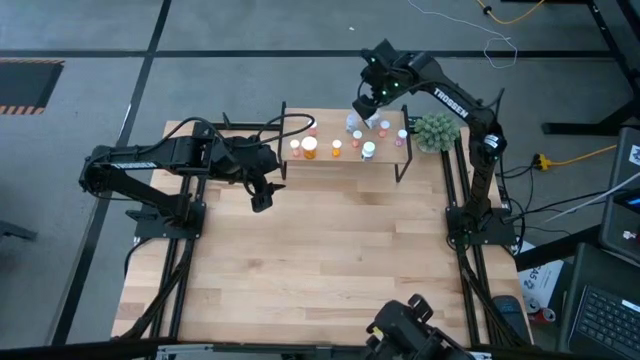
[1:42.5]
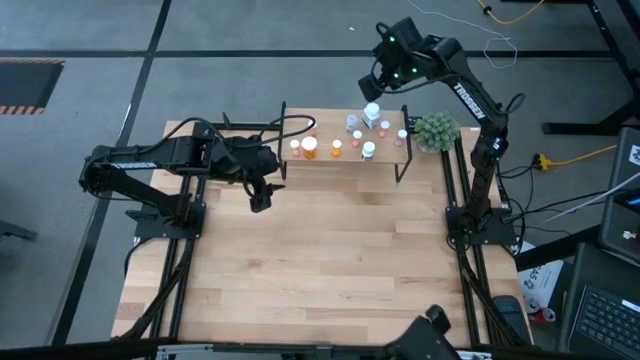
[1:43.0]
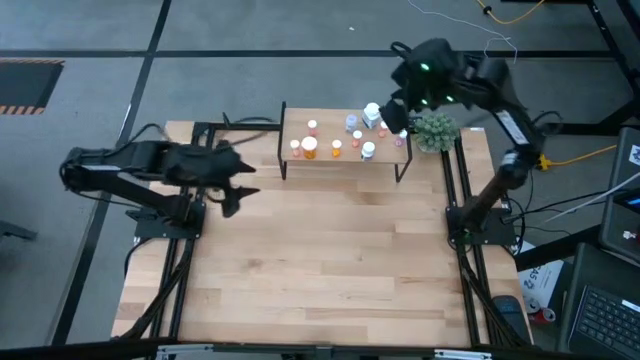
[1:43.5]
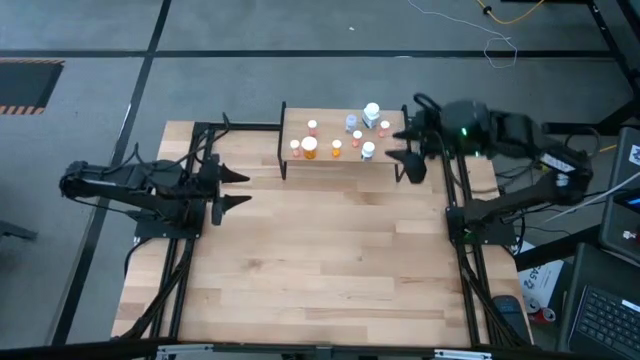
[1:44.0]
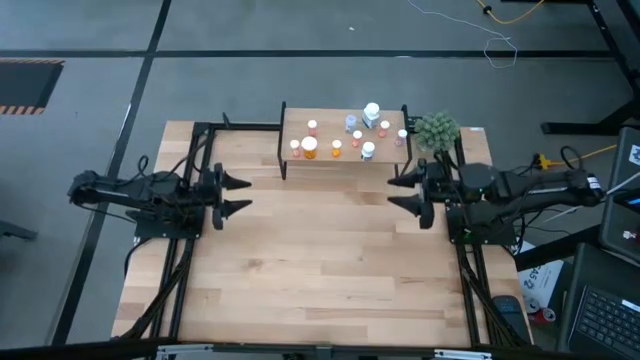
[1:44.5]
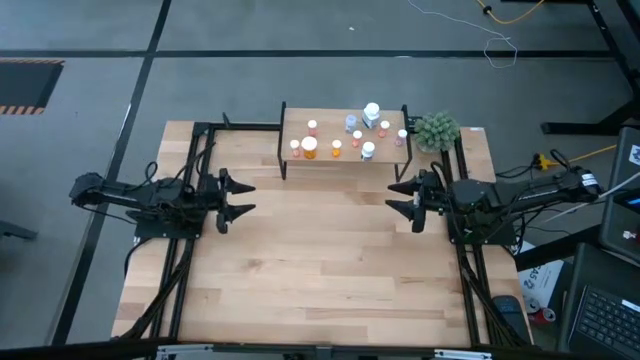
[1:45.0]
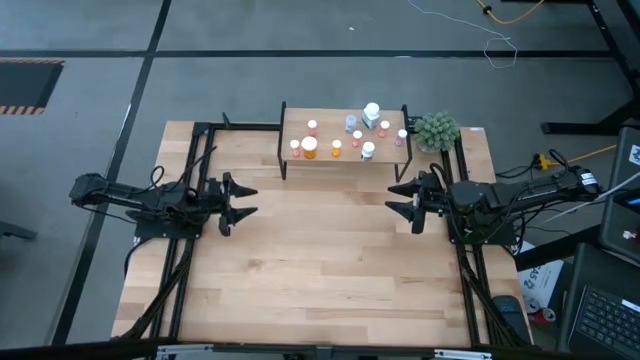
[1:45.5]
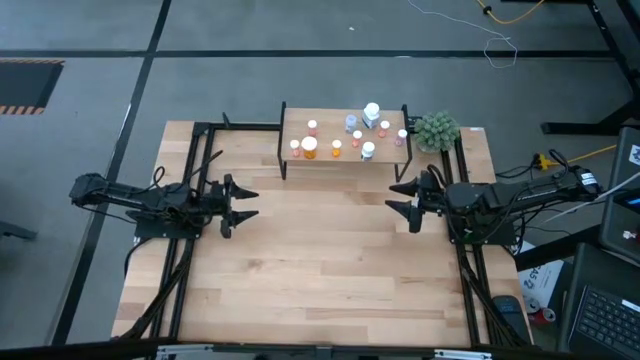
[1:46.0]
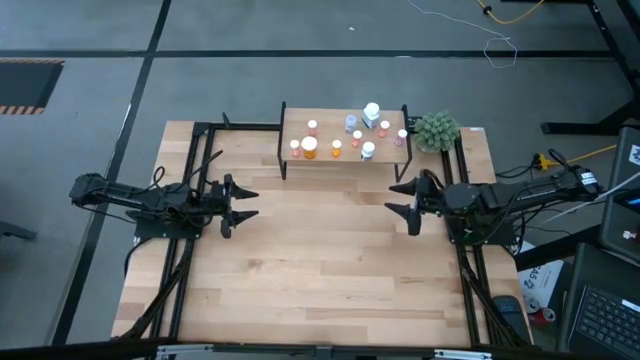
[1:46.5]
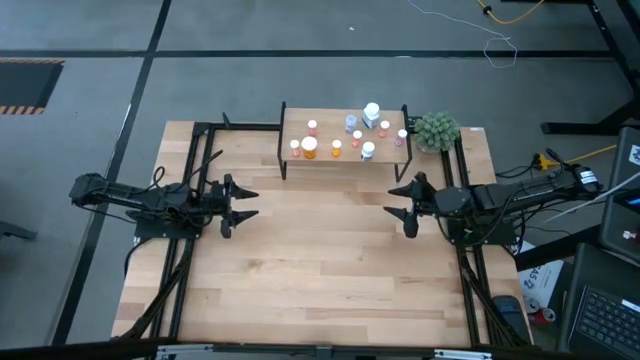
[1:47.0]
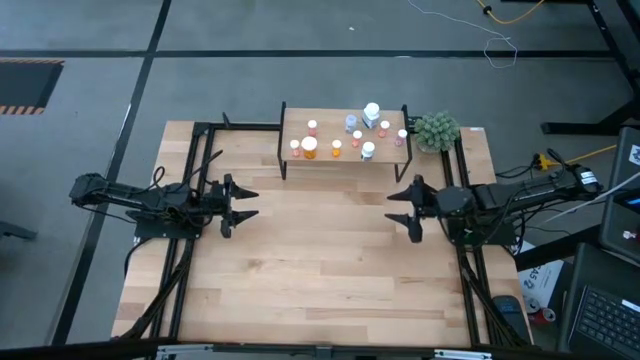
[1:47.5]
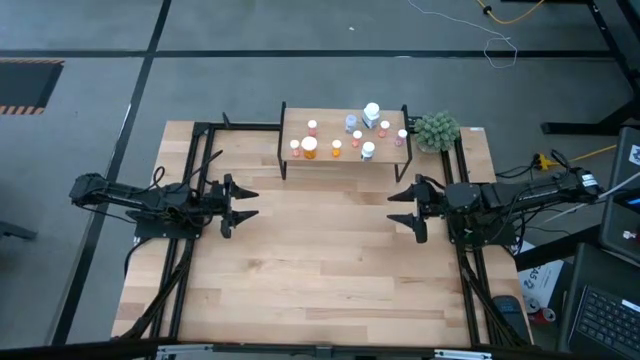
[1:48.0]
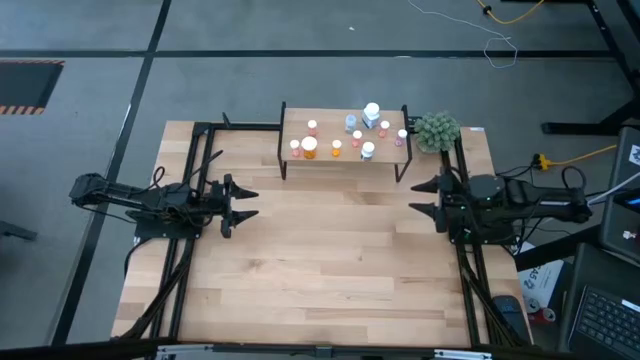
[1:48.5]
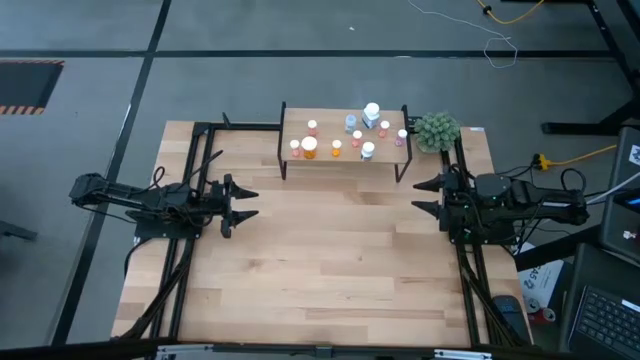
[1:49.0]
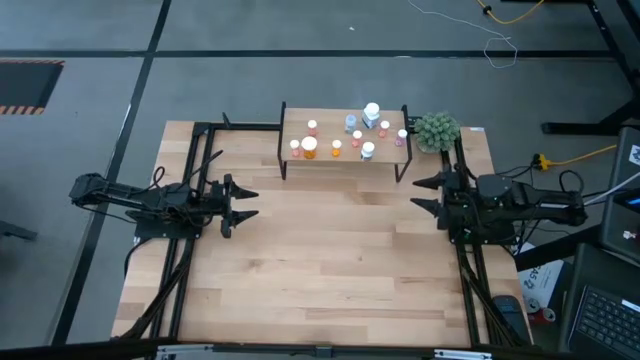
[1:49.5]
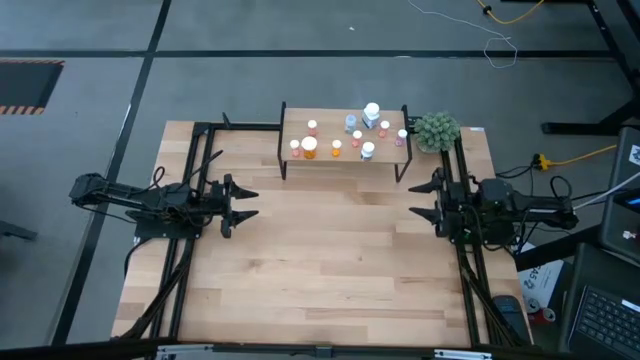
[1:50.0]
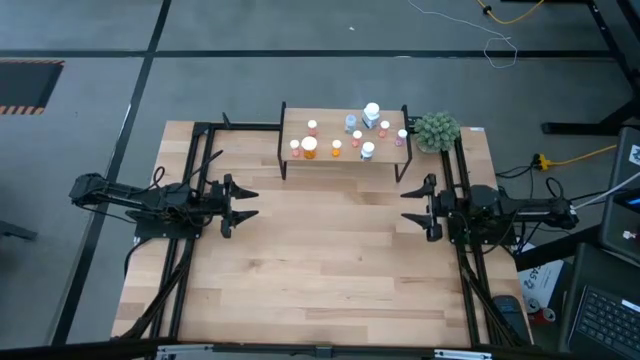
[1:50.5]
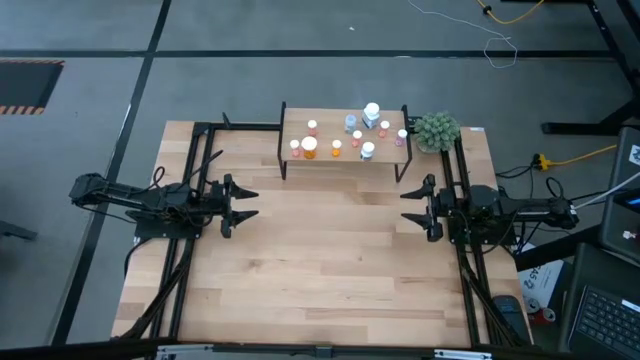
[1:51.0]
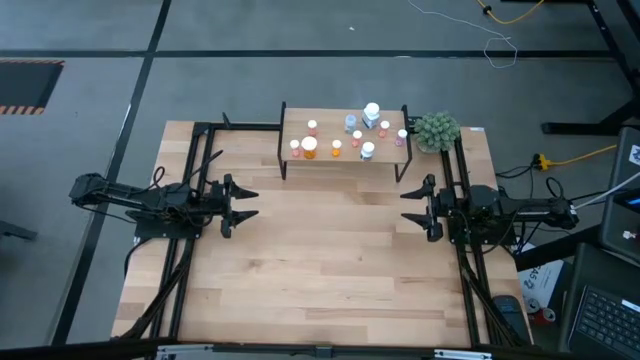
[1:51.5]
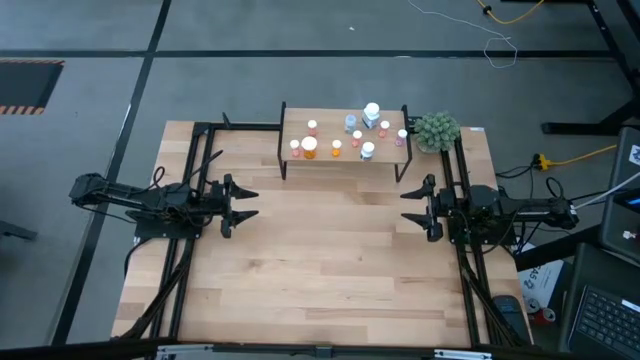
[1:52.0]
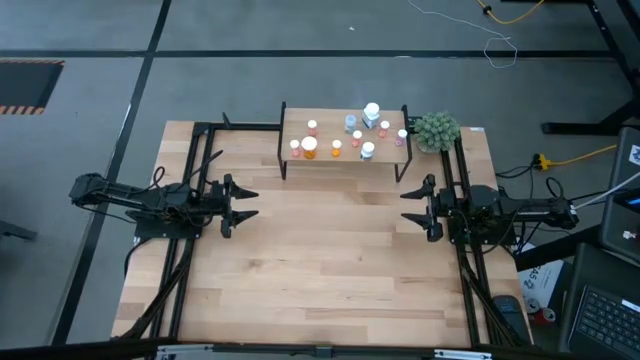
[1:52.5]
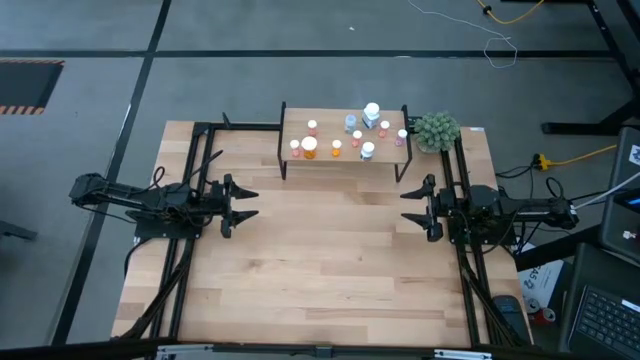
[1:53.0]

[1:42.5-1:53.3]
Task: Pick and place medicine bottles onto shelf by color
Return to Home Position

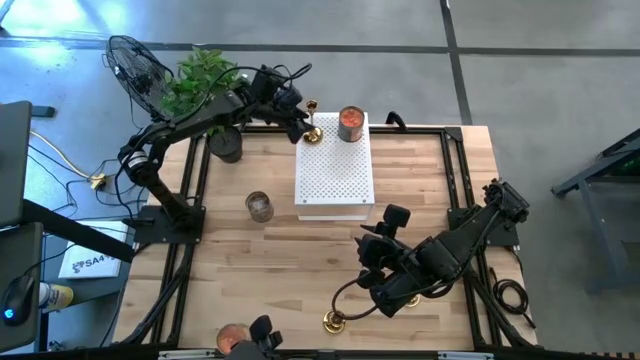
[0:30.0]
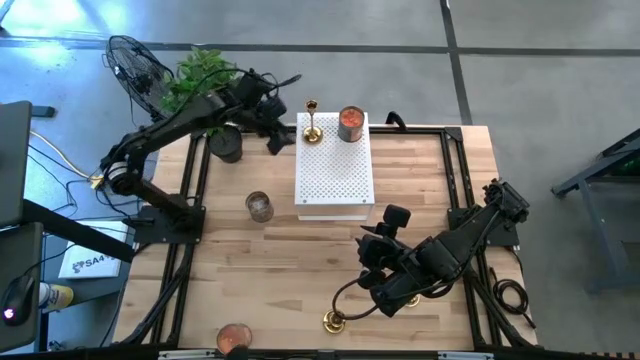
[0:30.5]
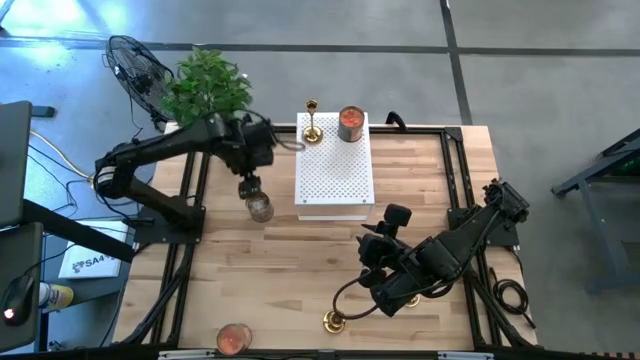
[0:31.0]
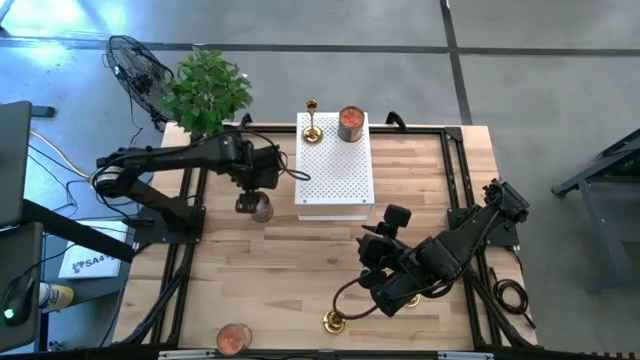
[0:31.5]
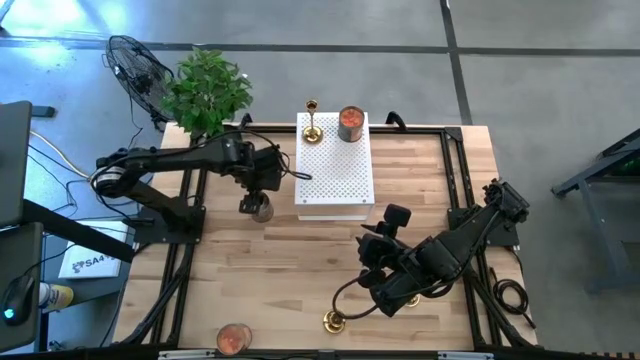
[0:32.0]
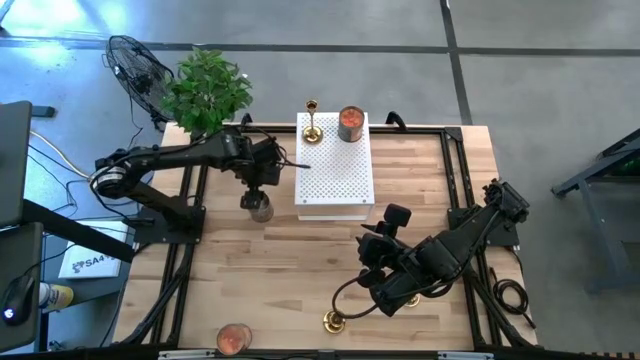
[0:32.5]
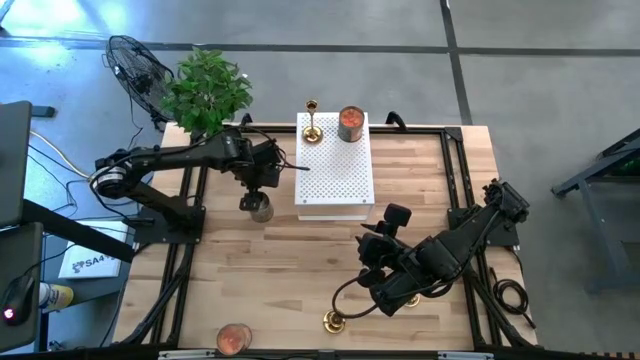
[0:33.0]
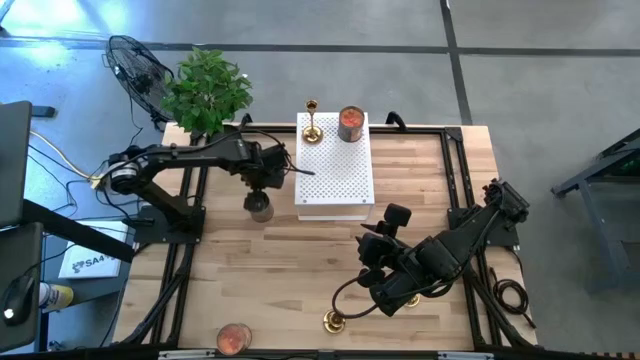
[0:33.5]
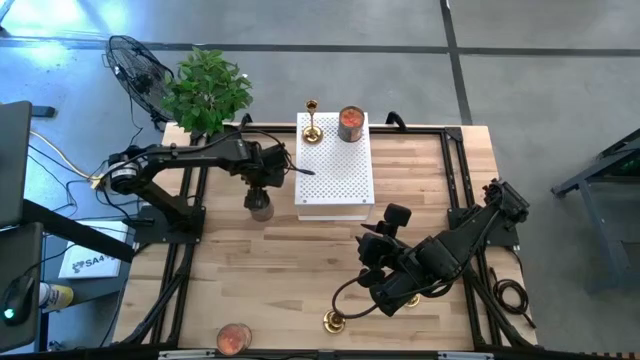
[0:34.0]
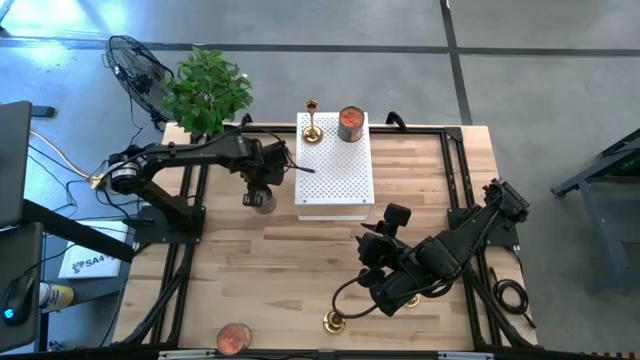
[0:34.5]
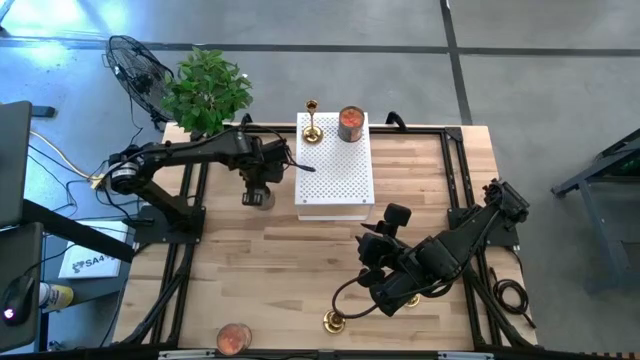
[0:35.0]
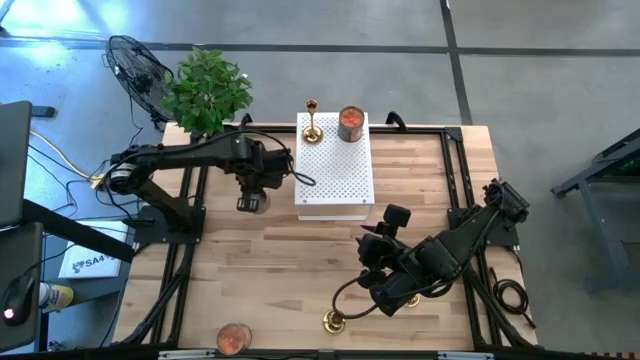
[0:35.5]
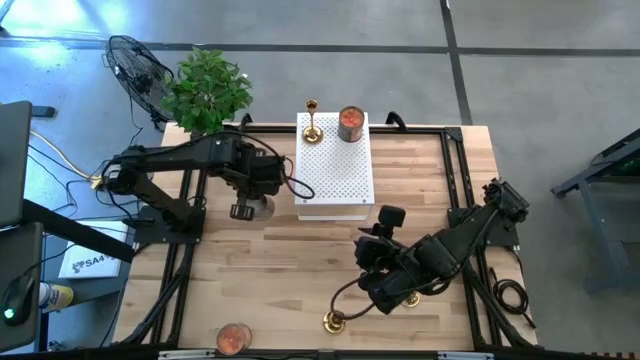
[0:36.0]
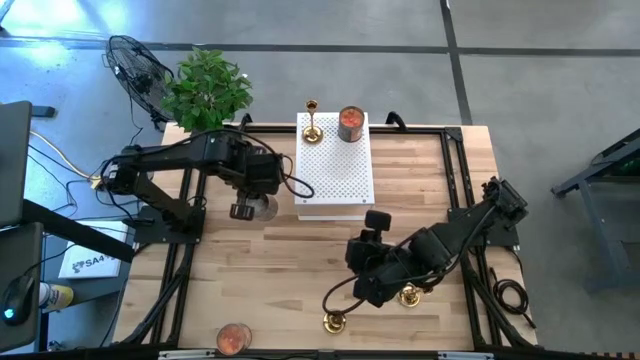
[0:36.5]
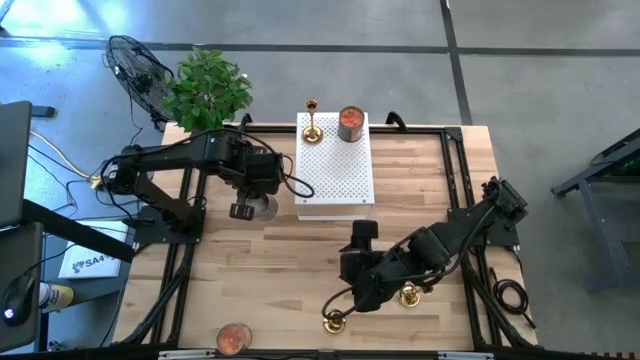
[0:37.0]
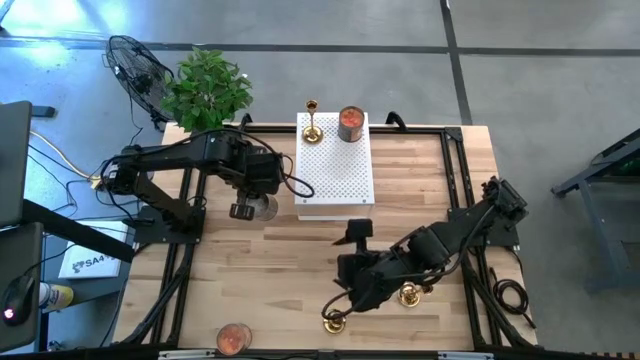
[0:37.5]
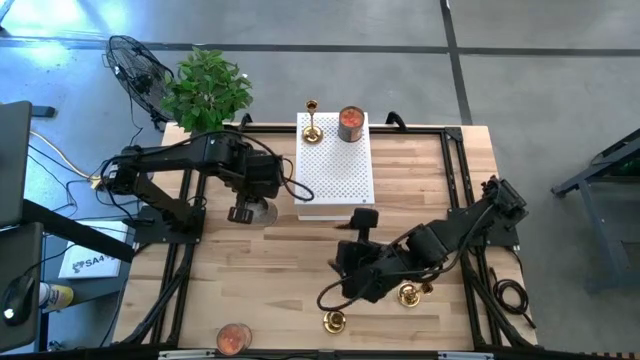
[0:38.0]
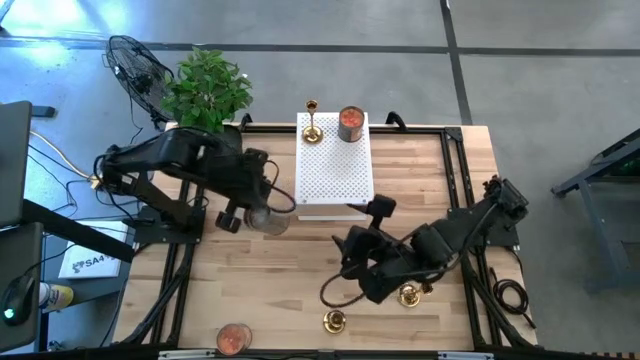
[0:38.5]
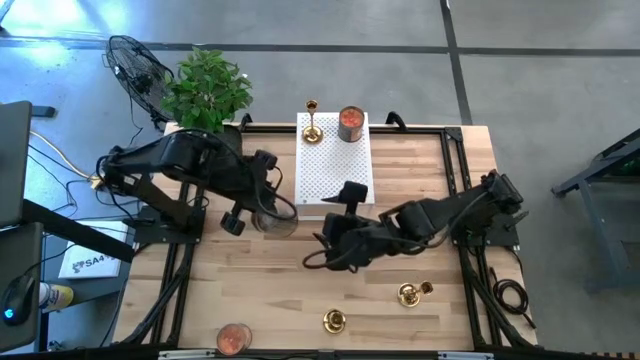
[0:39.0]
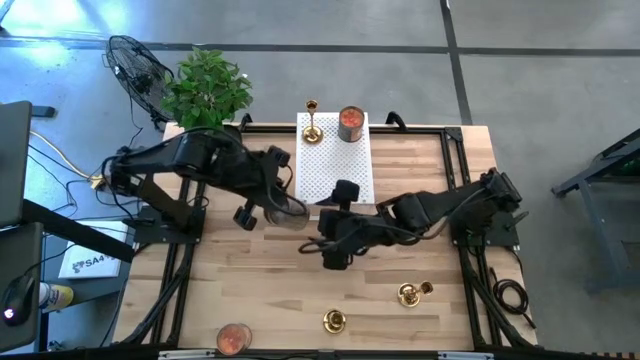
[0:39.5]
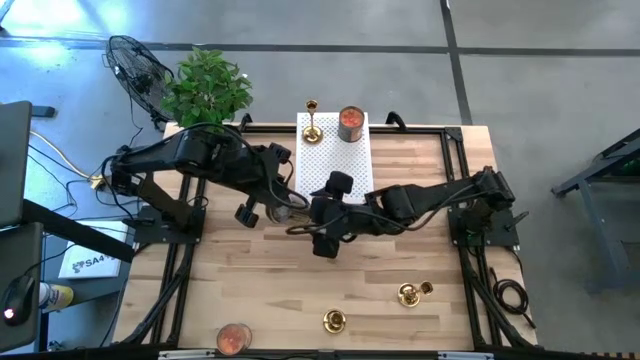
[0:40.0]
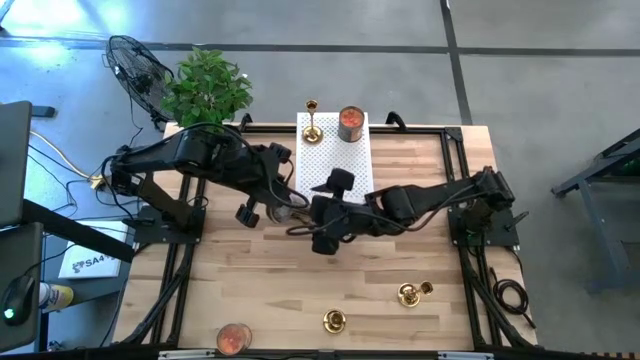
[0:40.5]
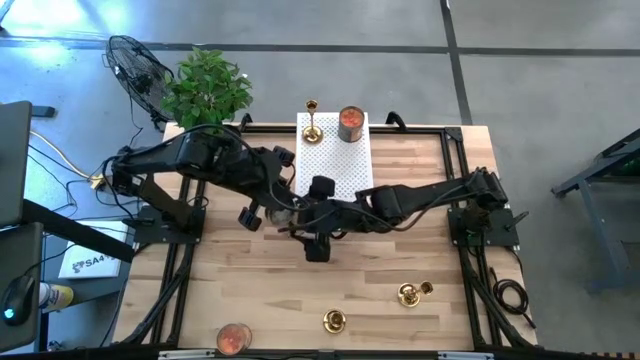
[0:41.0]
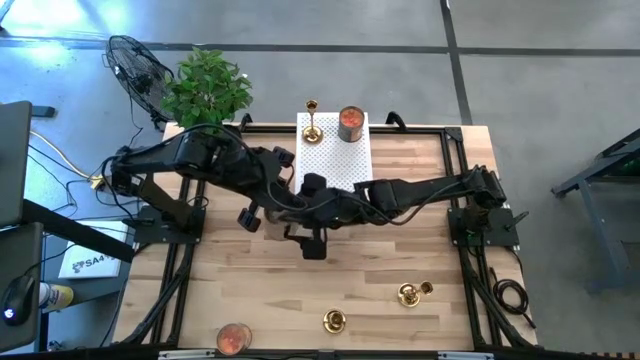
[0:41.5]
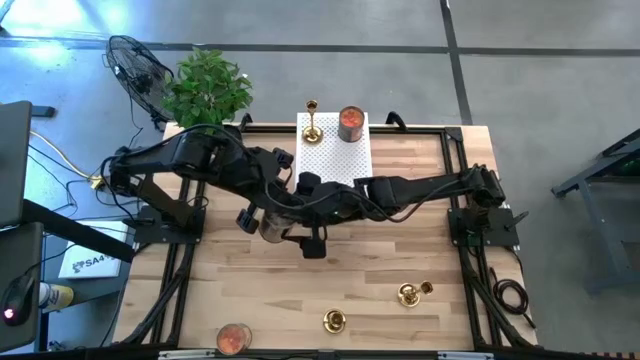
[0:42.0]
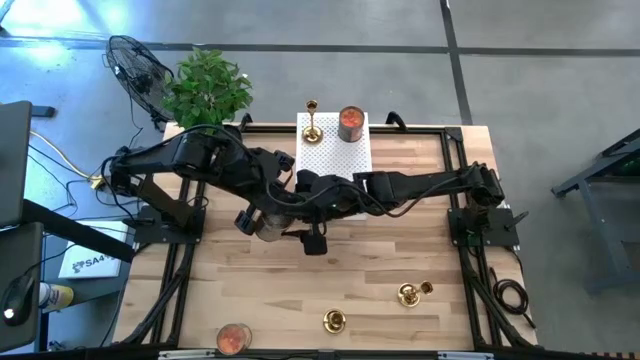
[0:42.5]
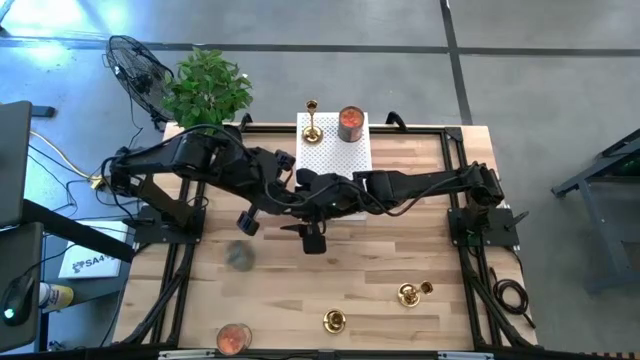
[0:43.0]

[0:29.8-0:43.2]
Task: Pick & Place candle stick holders
Put the brown scented candle on the shelf
